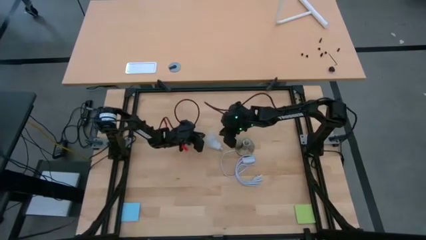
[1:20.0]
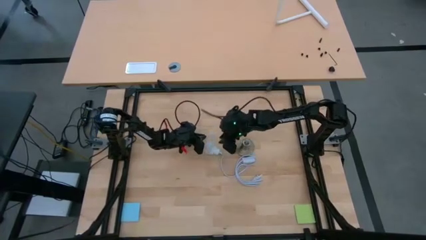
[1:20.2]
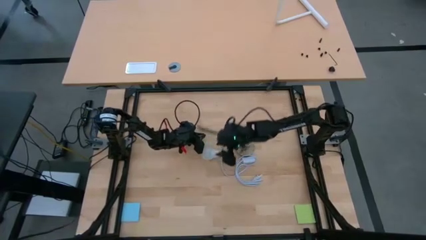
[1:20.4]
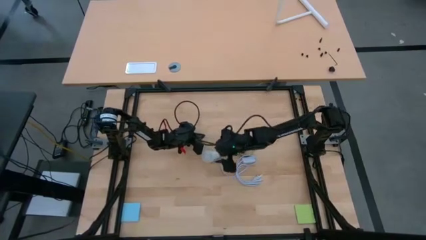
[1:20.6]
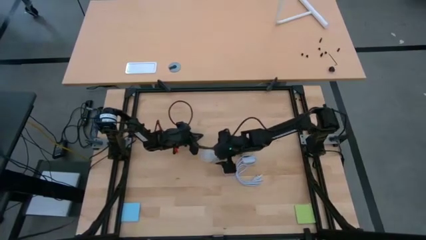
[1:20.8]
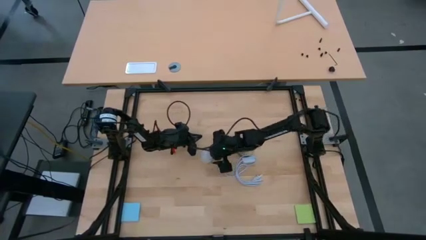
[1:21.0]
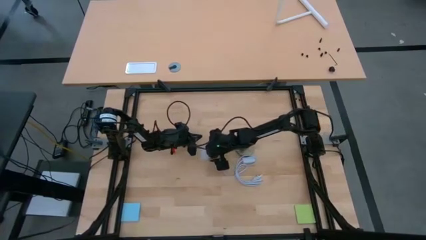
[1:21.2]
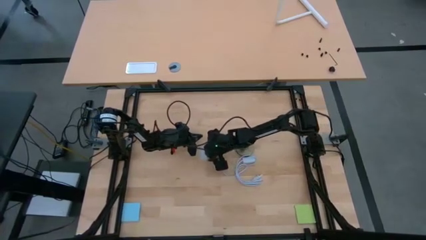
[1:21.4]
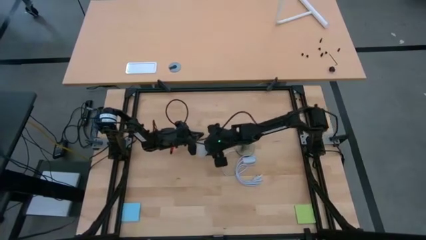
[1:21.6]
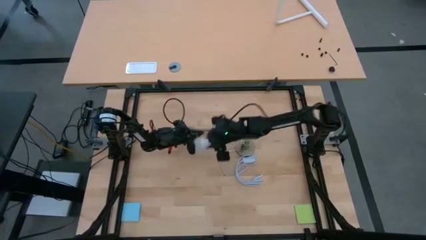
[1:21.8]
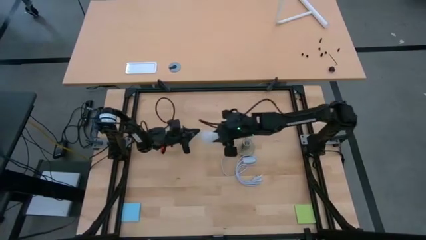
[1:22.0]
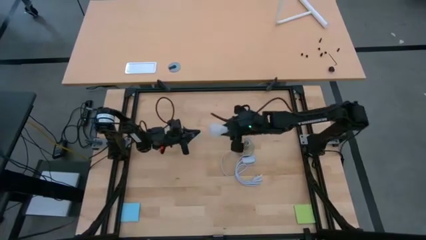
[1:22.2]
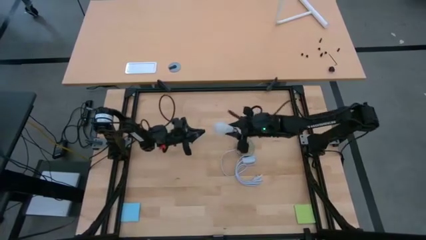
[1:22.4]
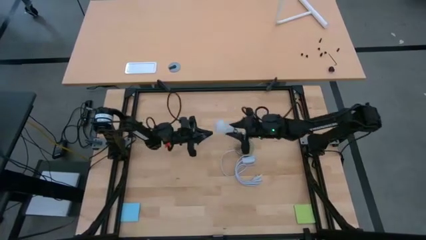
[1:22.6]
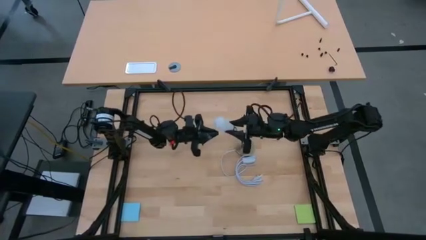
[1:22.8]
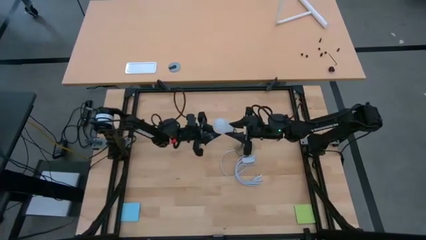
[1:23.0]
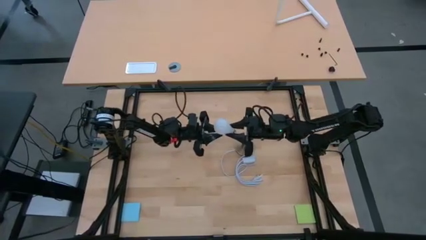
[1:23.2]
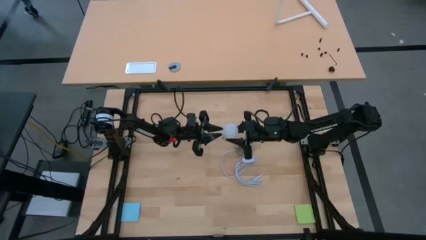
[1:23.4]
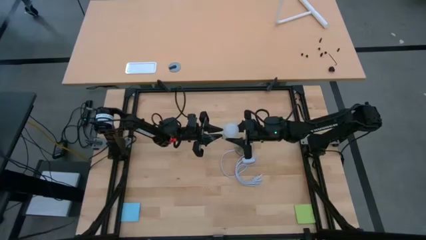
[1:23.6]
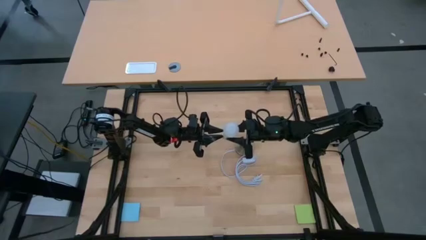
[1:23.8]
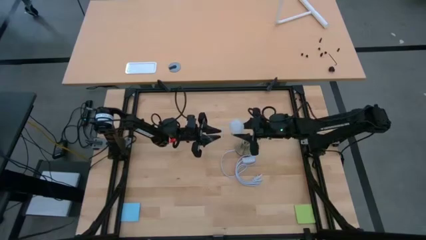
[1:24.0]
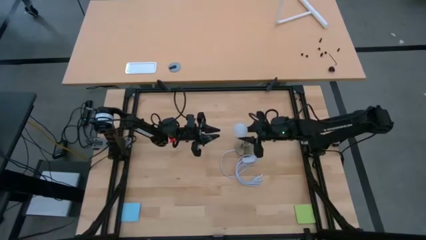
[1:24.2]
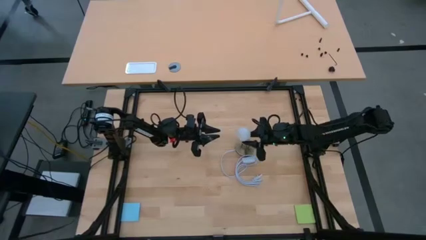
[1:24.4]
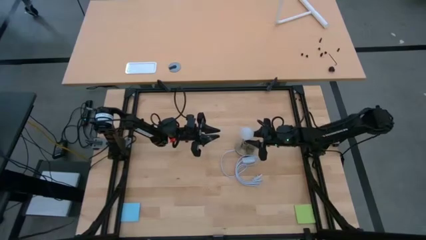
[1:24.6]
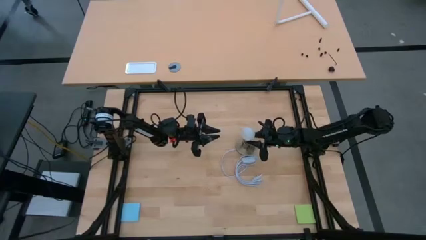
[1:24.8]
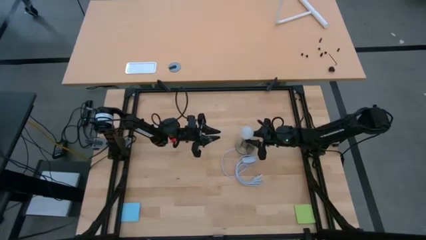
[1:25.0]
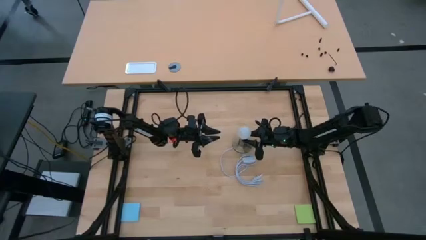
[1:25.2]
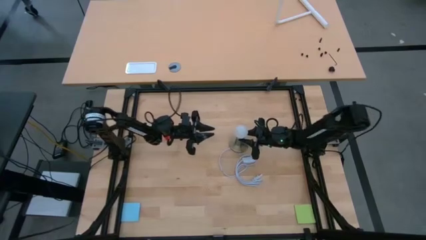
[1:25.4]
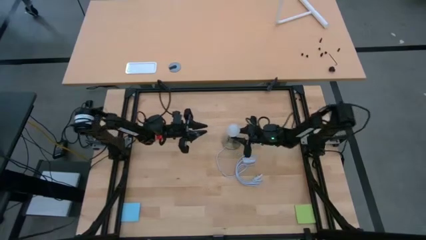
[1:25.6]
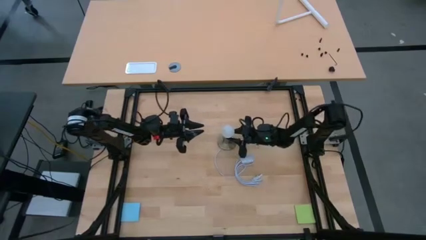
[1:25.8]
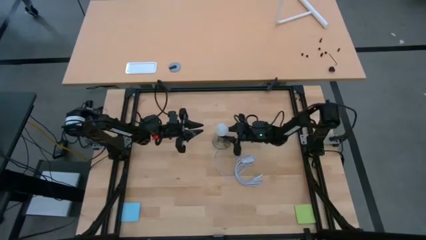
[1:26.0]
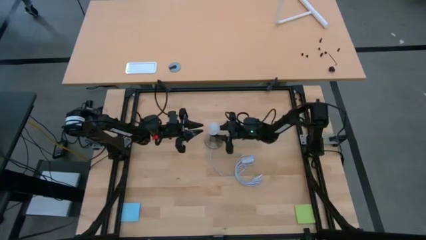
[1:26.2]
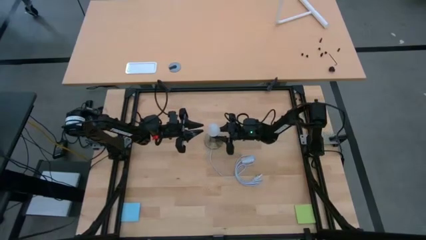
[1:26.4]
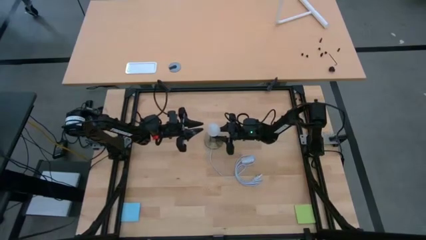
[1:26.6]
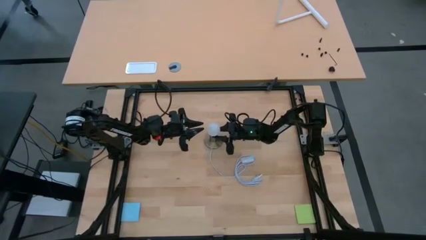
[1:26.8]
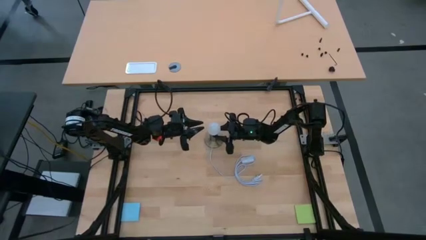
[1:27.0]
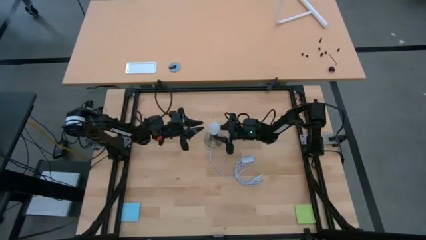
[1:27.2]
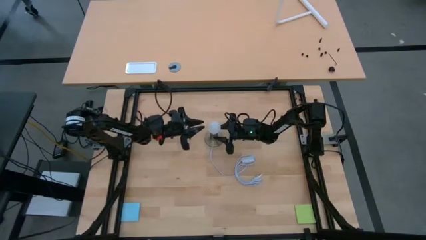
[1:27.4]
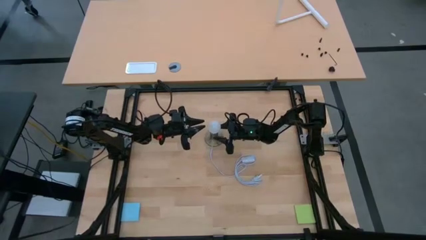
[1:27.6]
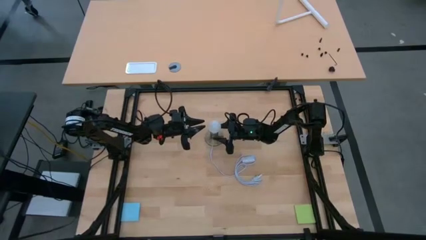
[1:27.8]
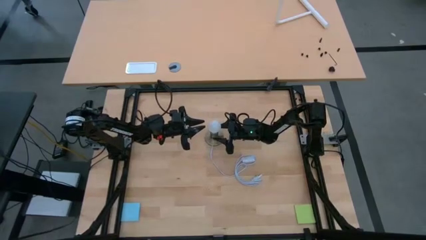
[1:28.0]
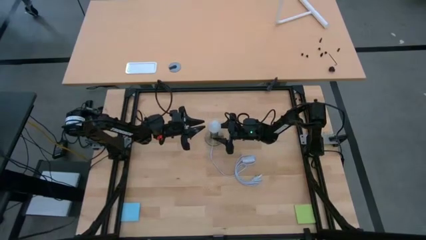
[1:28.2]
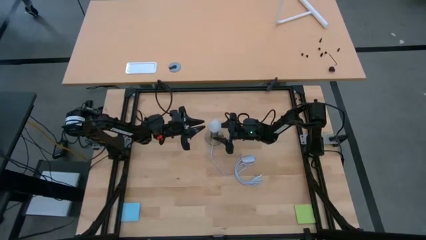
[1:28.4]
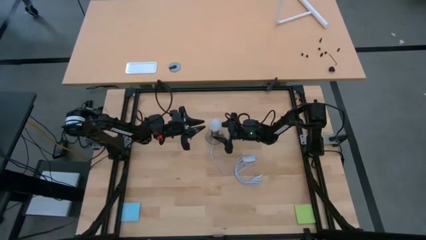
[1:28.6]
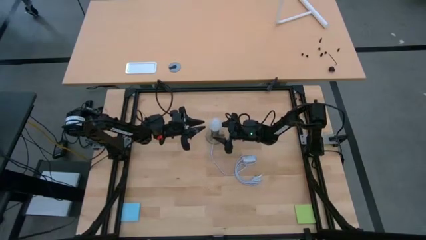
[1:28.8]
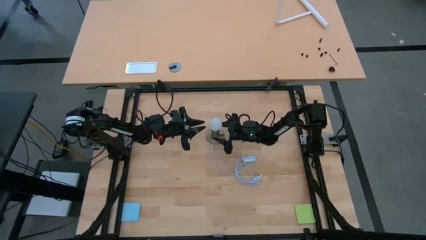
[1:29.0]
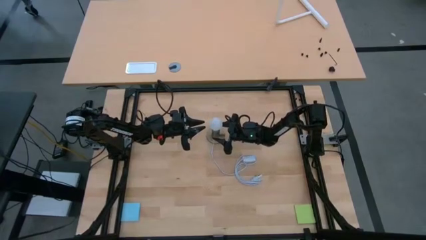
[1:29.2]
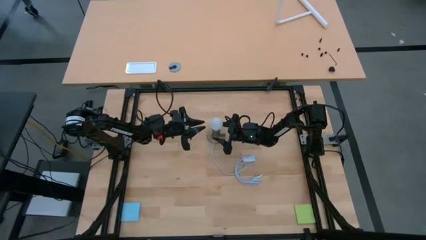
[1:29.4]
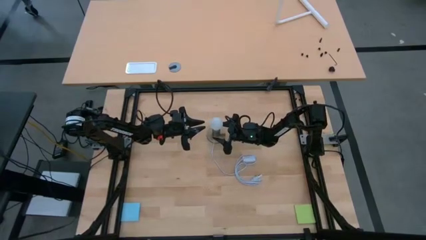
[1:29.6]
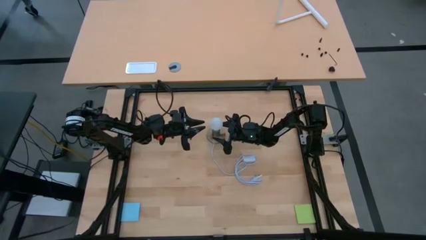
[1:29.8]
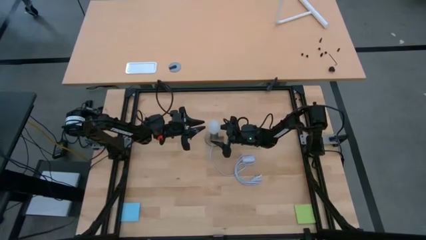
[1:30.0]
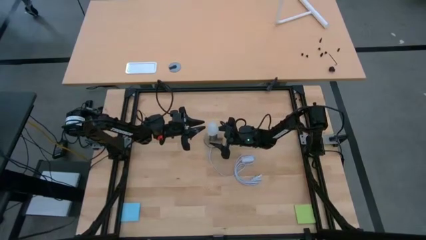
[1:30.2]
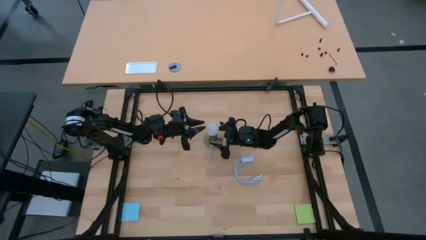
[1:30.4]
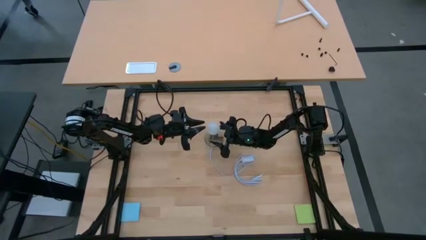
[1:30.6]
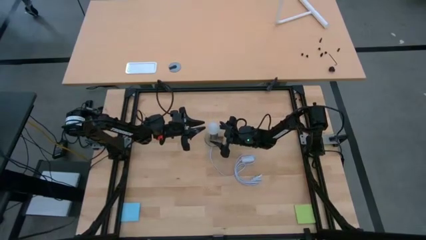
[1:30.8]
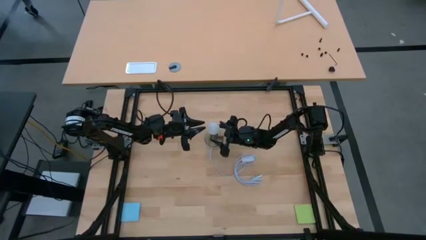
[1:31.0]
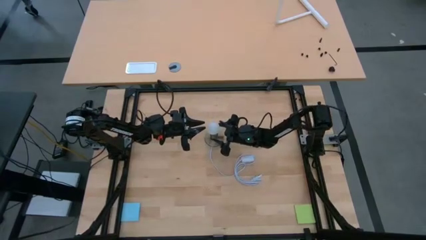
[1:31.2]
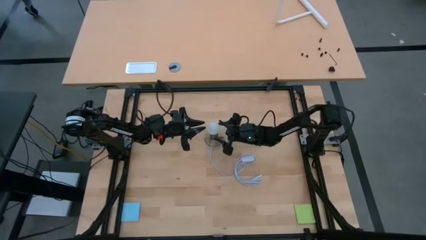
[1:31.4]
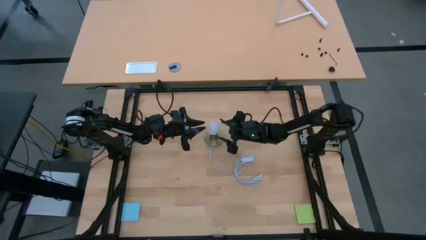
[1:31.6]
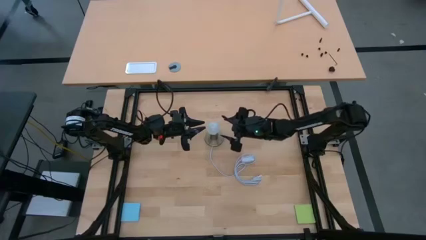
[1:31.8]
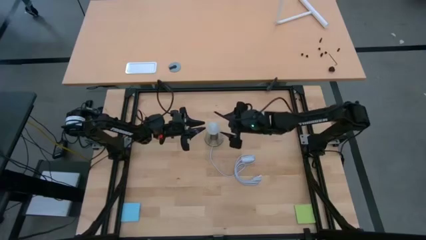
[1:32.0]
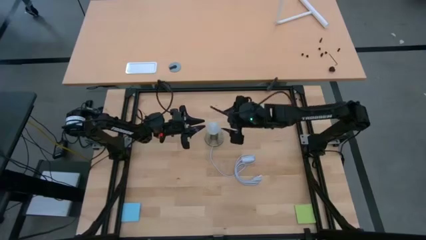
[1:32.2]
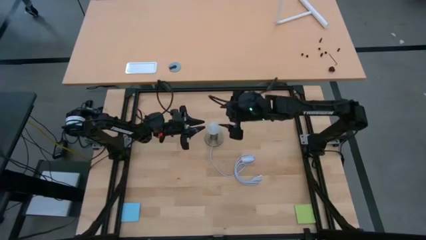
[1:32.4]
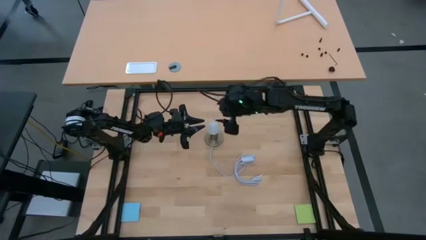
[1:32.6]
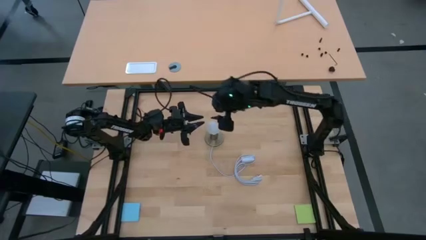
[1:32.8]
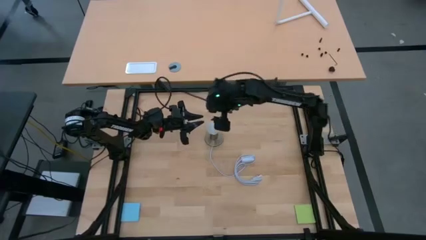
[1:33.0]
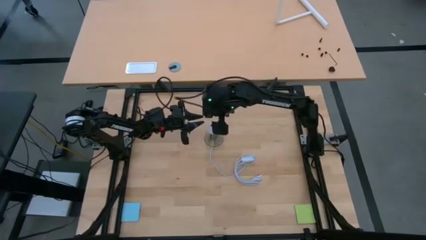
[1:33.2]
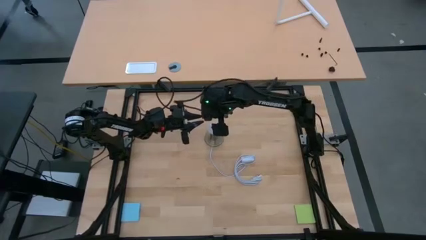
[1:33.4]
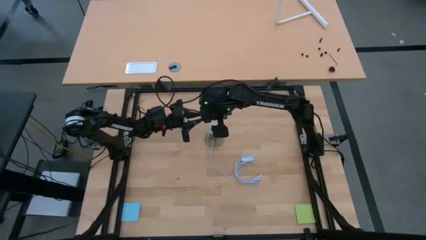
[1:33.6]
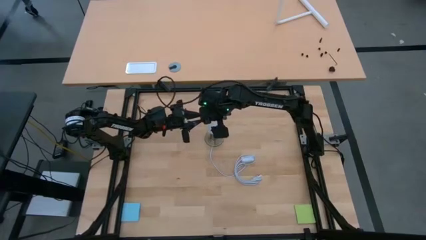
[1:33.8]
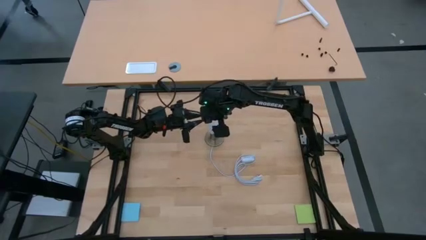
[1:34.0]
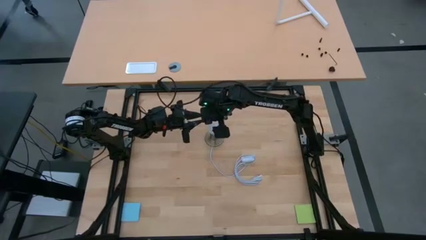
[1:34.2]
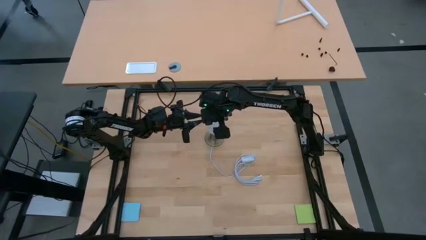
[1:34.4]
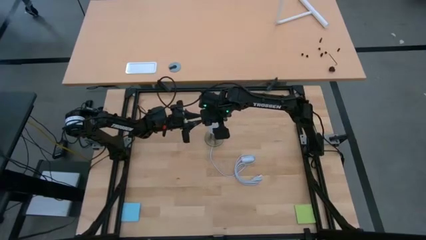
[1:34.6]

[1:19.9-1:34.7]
Task: Screw lightbulb
Insert the white lightbulb into the golden lamp
